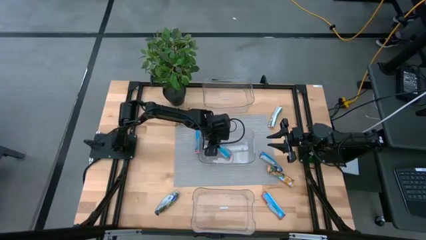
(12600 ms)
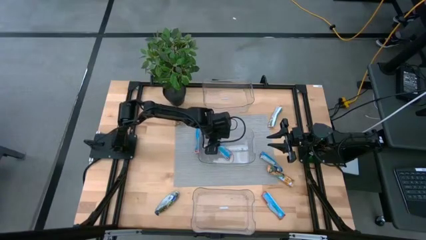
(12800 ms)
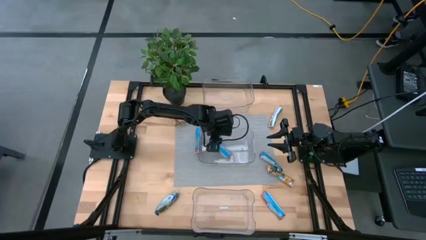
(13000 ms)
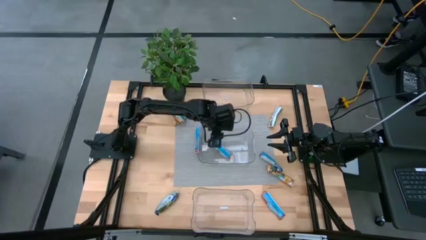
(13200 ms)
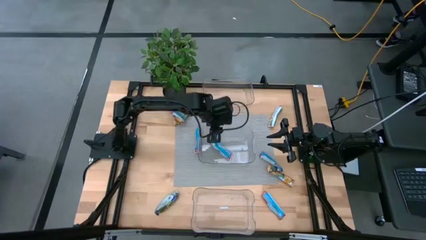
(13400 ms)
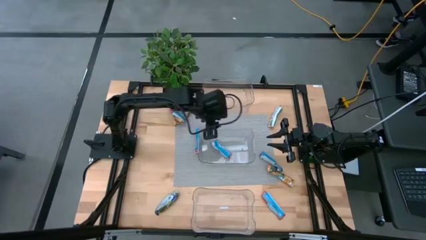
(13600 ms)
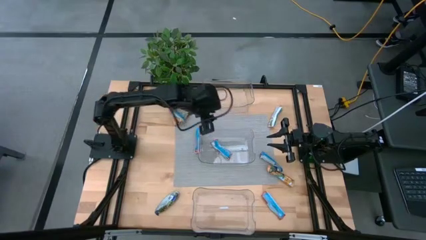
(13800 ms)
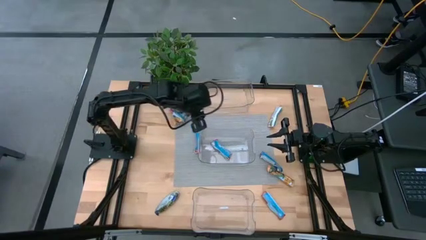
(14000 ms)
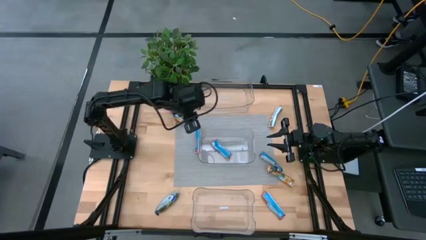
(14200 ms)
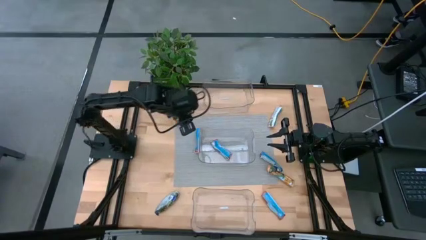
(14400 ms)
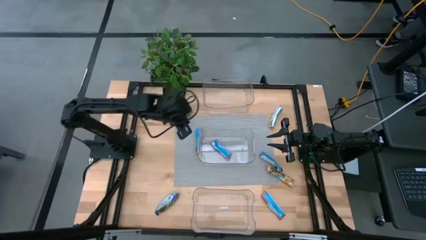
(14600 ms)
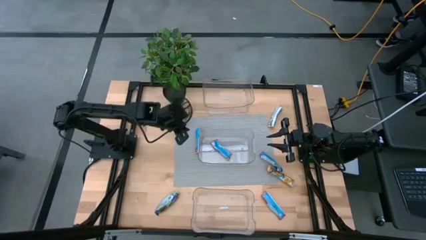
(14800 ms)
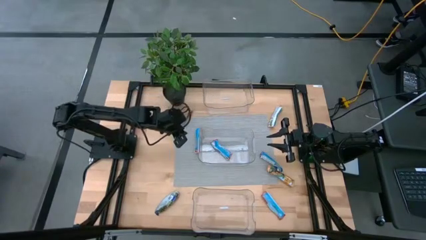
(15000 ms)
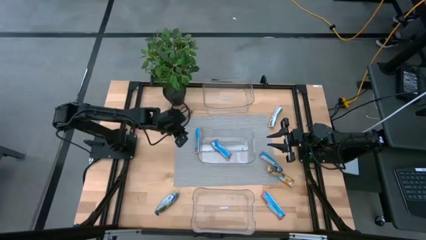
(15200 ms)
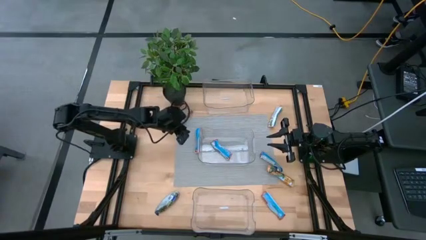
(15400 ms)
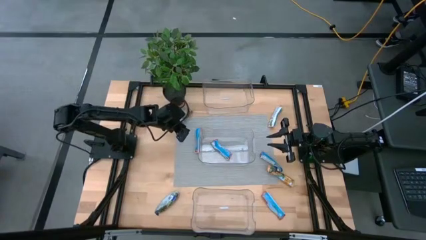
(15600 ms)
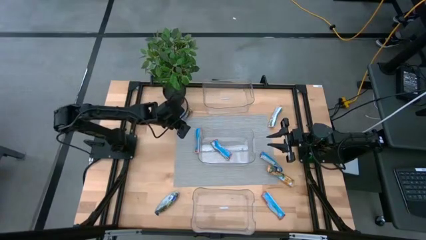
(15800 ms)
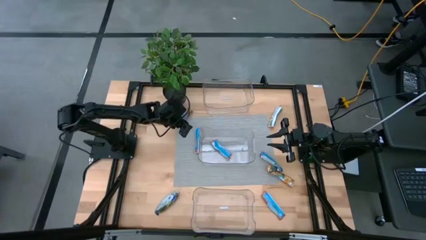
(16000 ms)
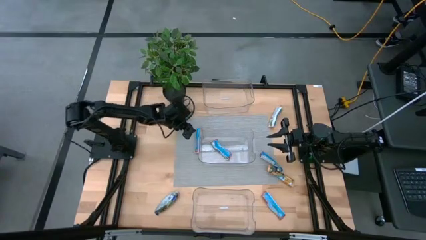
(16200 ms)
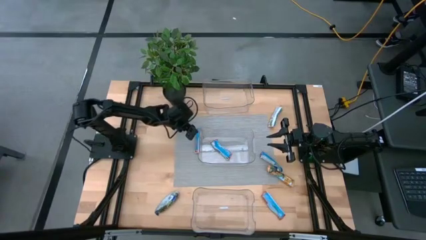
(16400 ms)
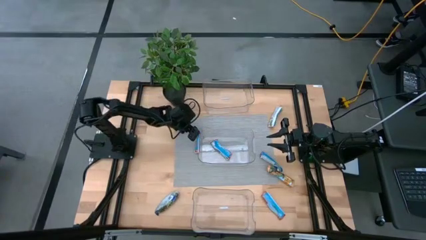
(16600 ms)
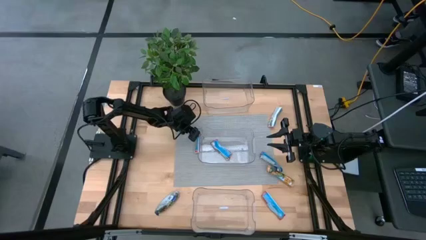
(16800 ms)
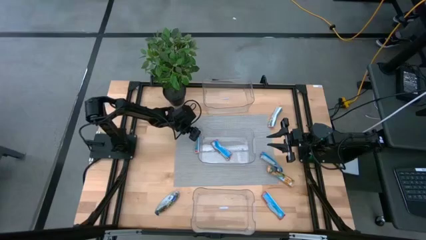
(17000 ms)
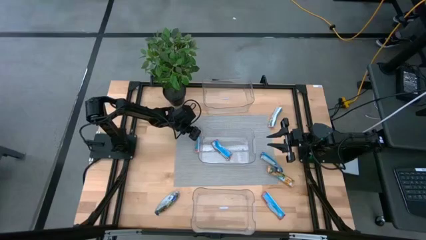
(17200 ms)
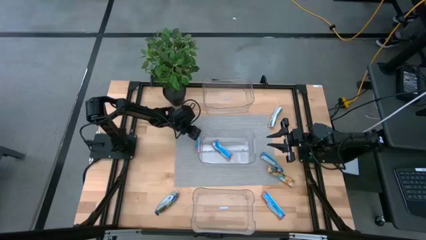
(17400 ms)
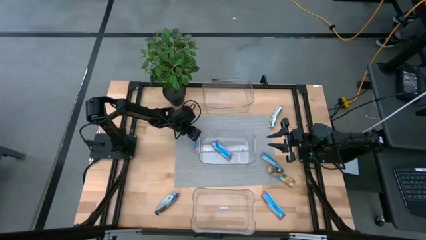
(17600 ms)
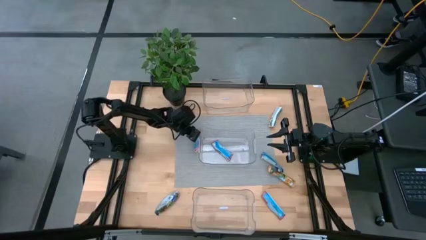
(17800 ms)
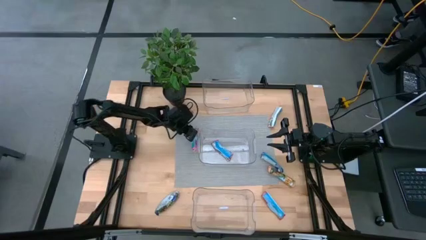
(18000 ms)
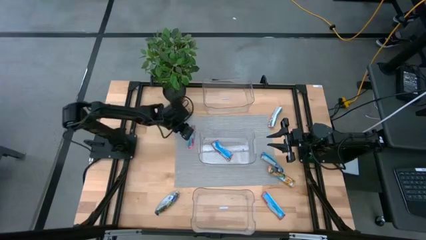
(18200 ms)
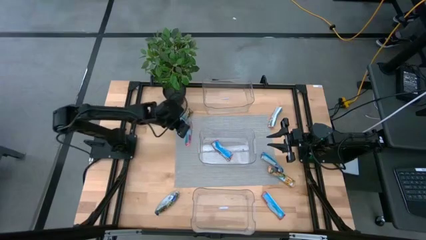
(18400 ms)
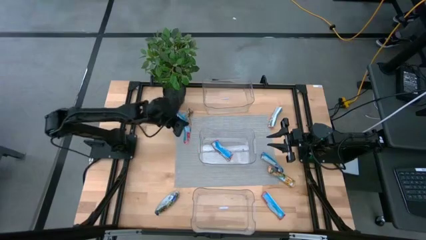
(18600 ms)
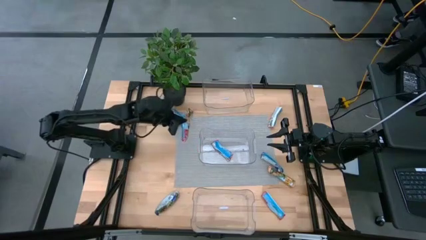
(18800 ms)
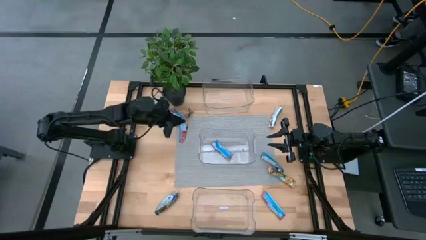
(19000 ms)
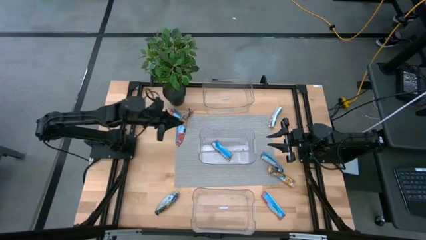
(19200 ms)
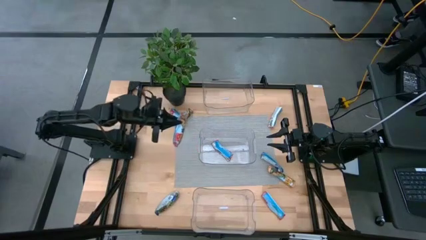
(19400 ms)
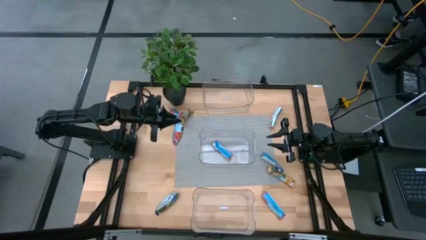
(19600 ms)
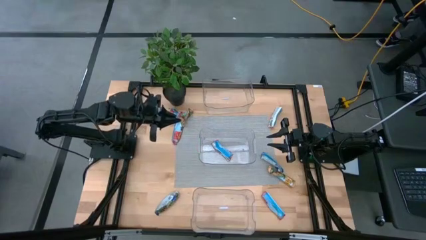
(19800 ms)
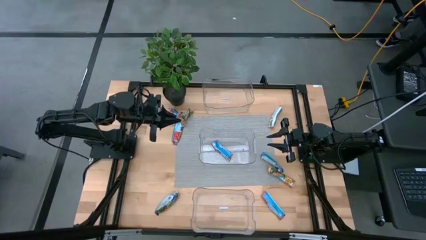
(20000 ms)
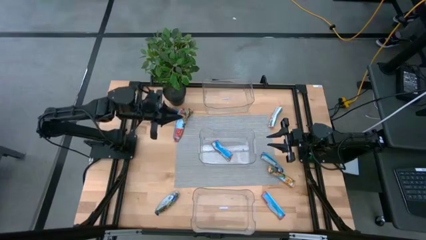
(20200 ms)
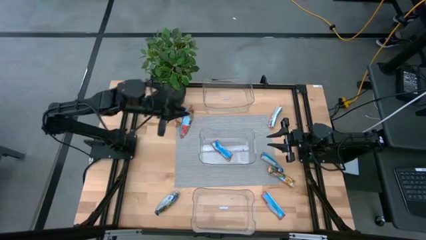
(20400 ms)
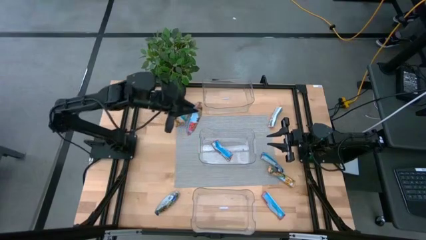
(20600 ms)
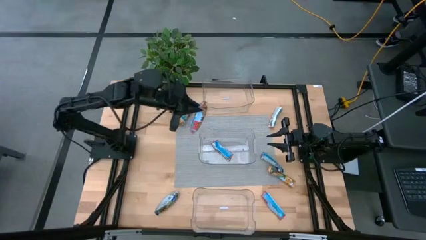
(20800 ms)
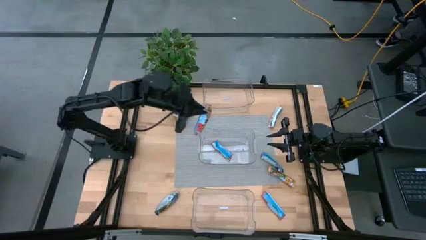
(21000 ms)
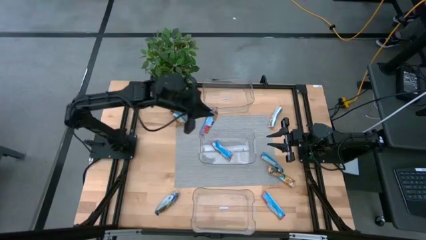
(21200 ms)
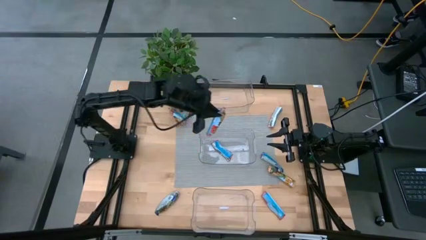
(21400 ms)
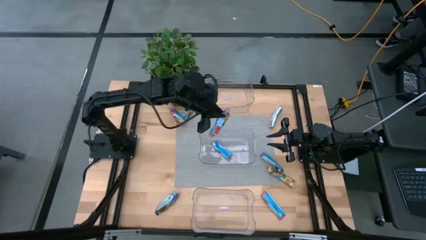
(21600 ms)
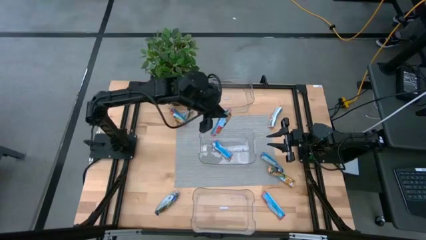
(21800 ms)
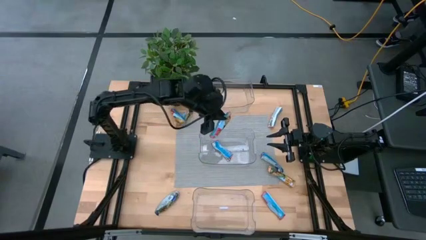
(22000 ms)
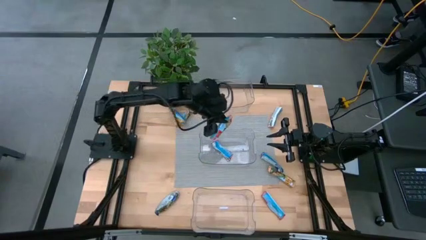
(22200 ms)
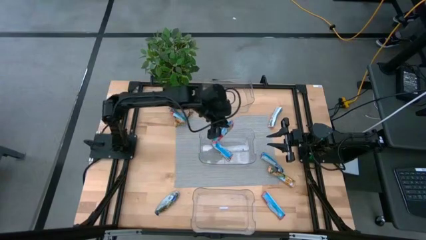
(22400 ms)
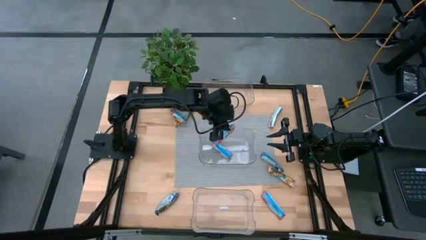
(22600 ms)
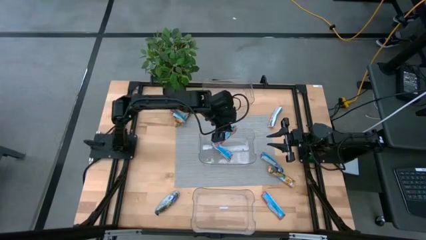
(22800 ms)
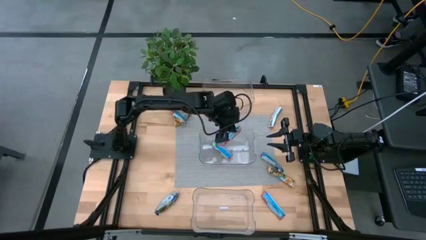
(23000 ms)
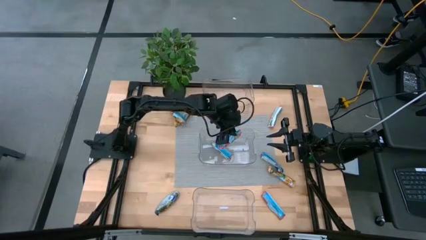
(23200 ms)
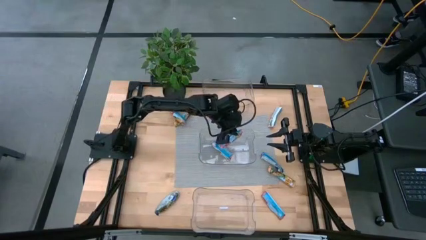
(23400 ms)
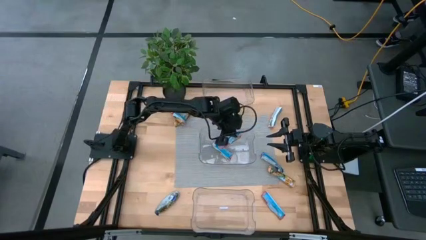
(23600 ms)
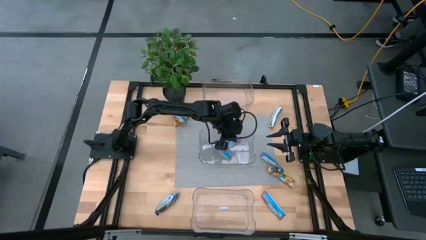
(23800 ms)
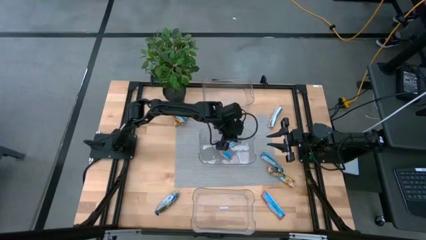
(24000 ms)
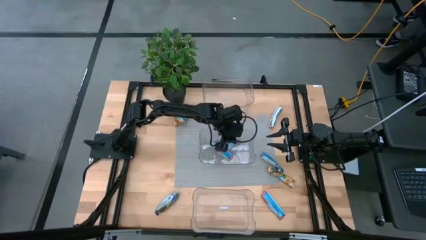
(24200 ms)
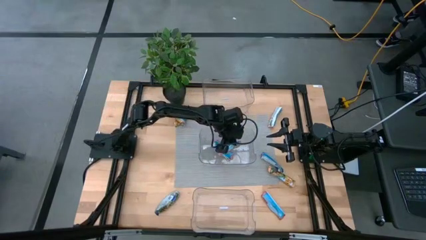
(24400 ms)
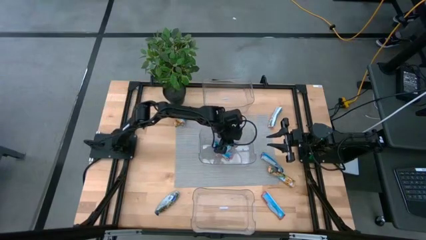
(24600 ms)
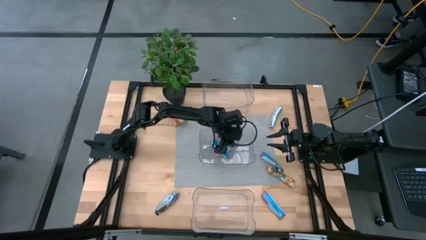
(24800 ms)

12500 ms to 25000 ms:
Task: Pick and place Granola Bars by type
Put the red granola bar into the middle transparent bin
